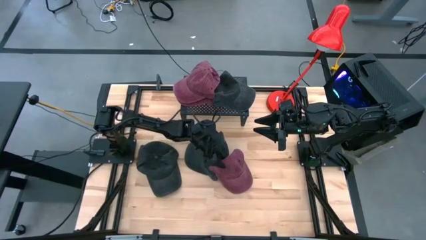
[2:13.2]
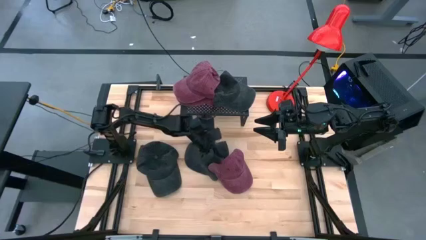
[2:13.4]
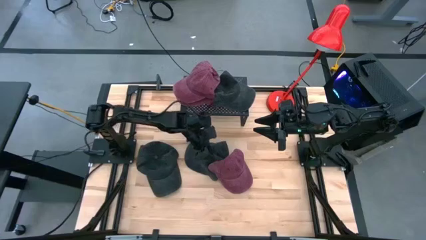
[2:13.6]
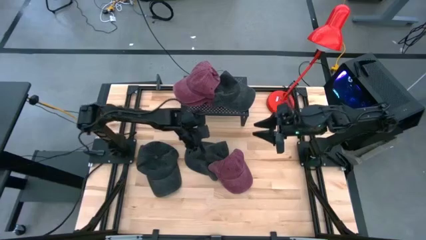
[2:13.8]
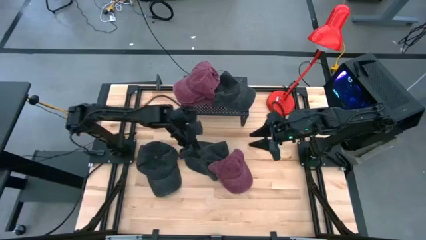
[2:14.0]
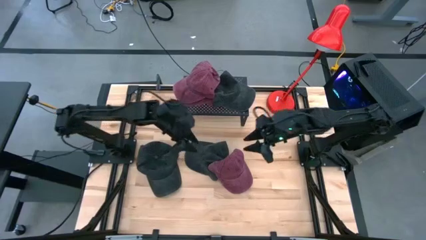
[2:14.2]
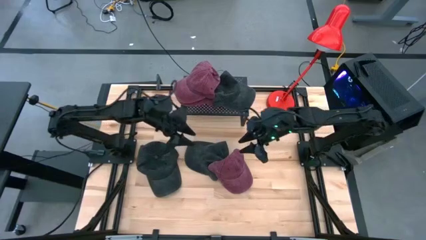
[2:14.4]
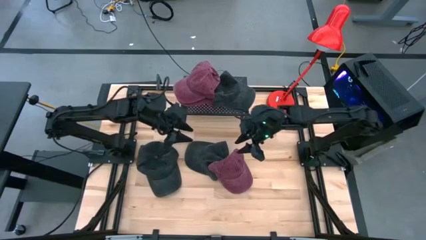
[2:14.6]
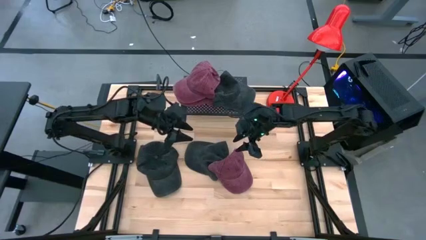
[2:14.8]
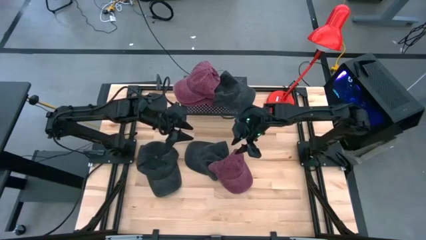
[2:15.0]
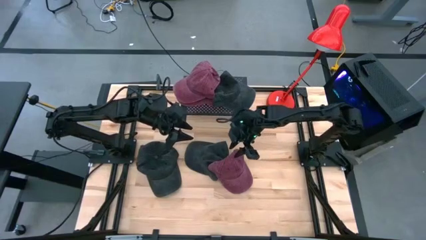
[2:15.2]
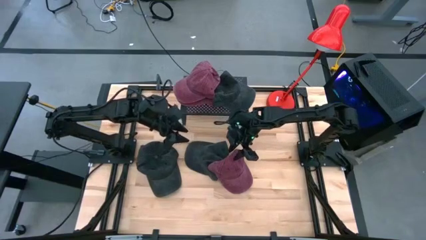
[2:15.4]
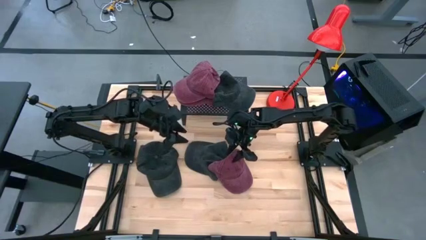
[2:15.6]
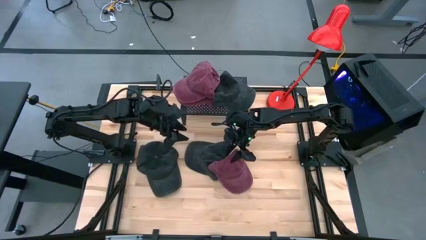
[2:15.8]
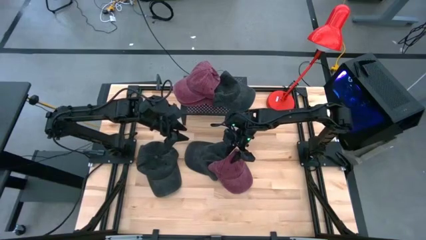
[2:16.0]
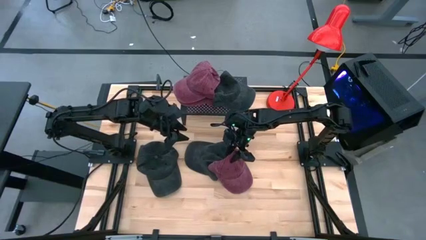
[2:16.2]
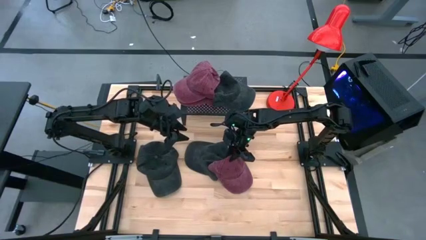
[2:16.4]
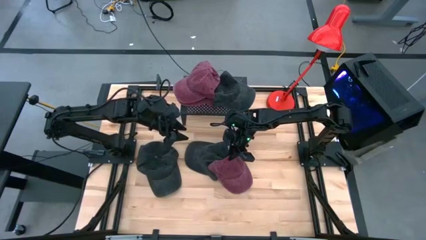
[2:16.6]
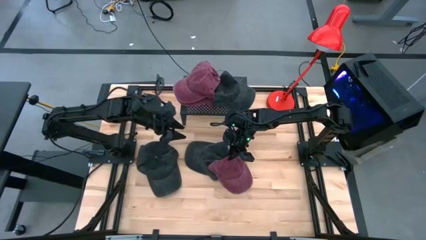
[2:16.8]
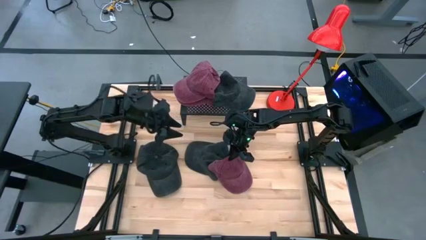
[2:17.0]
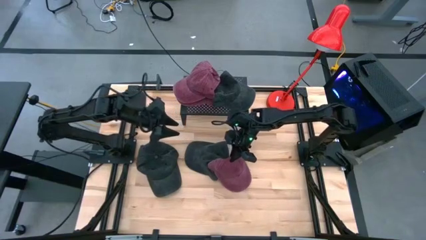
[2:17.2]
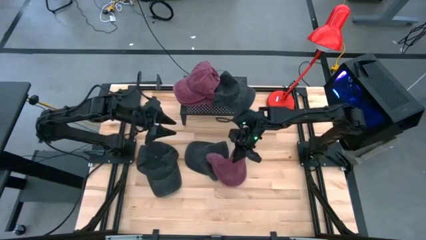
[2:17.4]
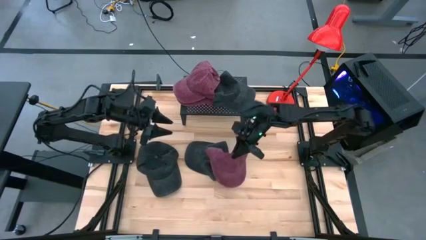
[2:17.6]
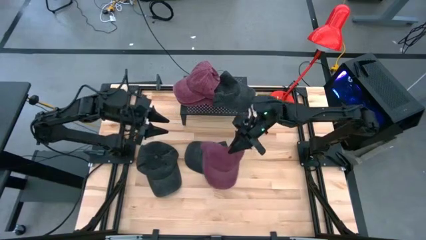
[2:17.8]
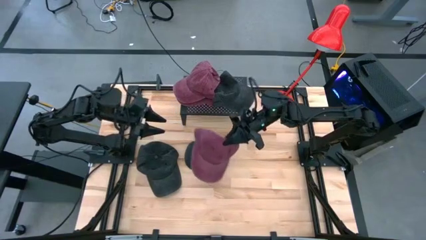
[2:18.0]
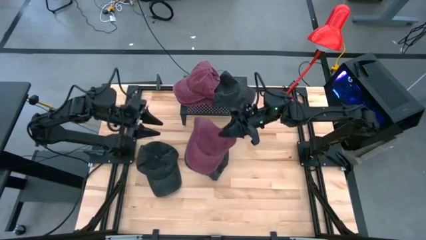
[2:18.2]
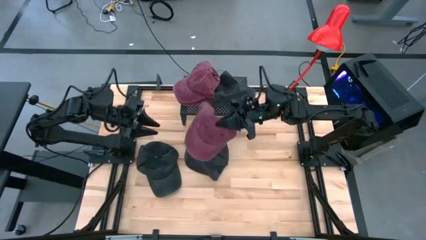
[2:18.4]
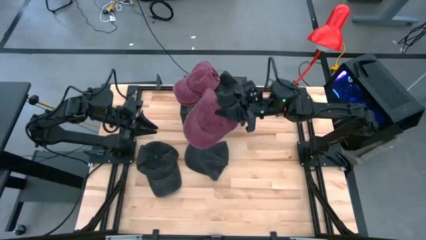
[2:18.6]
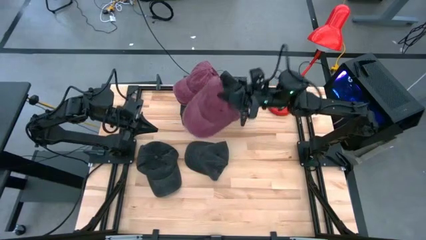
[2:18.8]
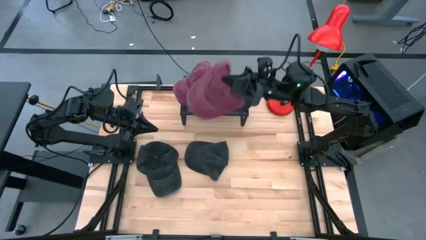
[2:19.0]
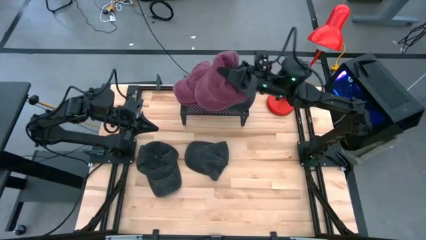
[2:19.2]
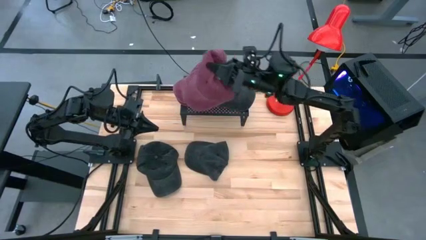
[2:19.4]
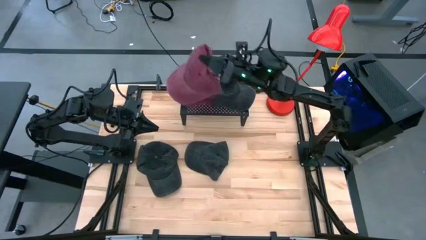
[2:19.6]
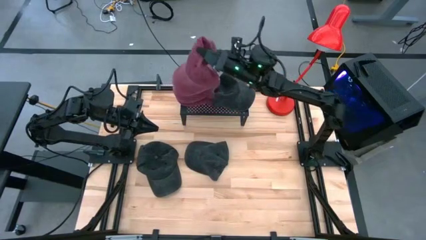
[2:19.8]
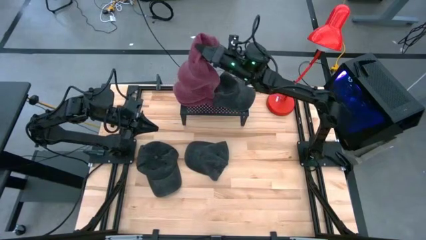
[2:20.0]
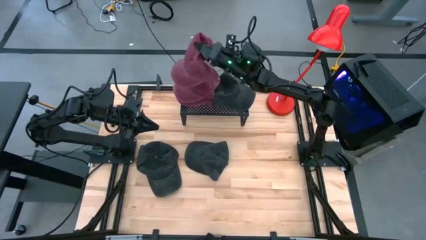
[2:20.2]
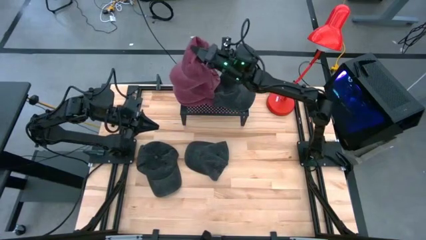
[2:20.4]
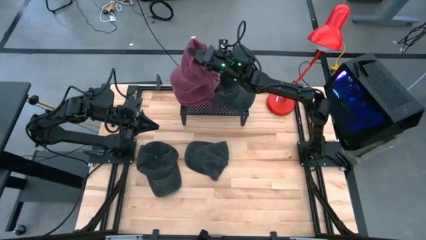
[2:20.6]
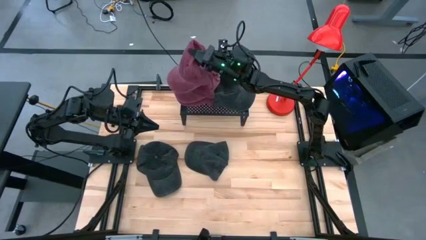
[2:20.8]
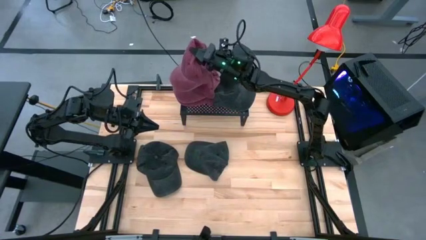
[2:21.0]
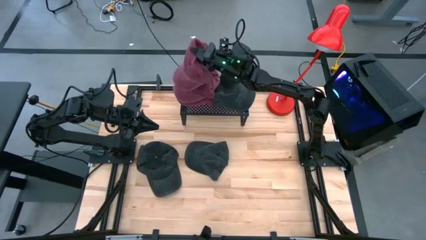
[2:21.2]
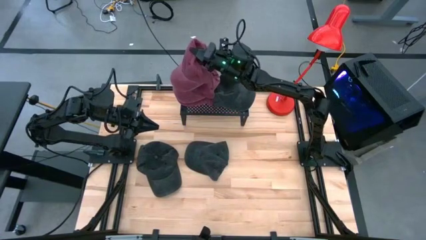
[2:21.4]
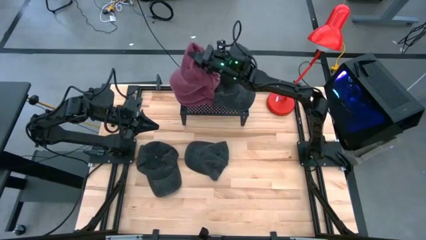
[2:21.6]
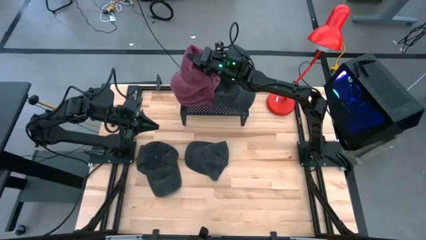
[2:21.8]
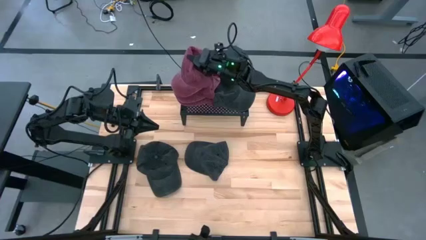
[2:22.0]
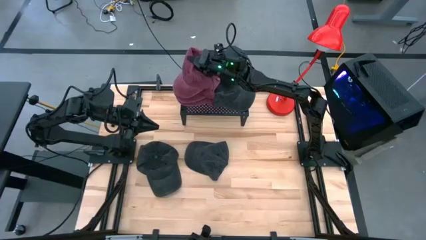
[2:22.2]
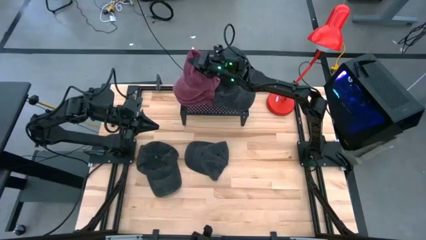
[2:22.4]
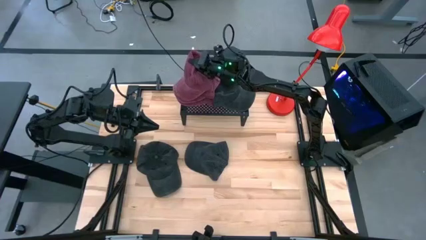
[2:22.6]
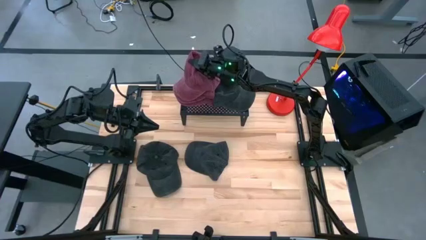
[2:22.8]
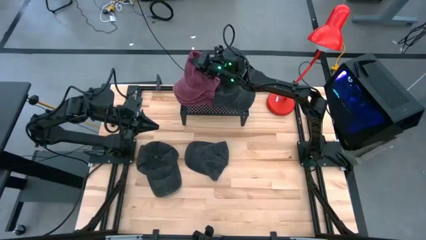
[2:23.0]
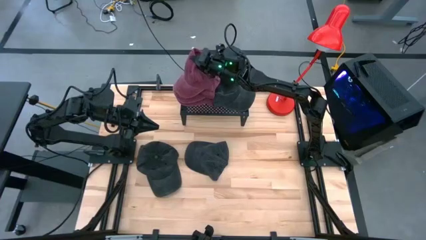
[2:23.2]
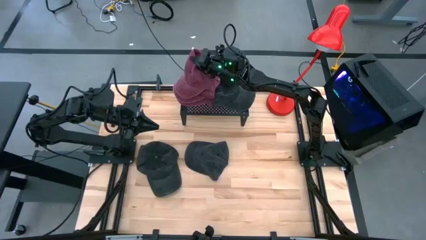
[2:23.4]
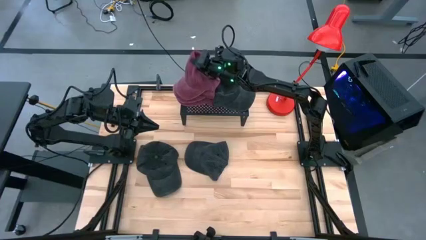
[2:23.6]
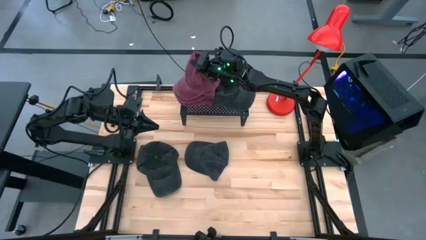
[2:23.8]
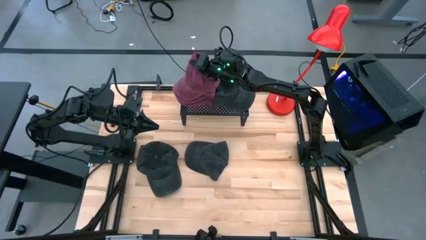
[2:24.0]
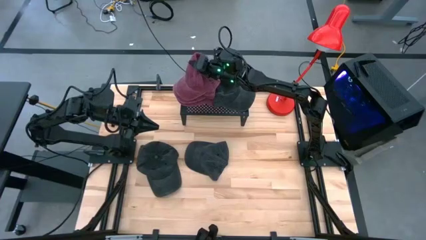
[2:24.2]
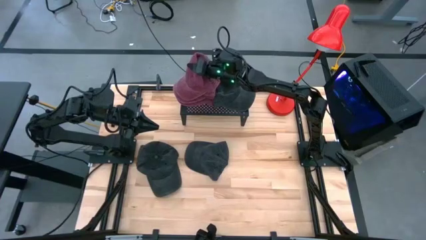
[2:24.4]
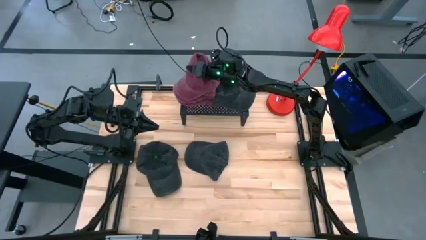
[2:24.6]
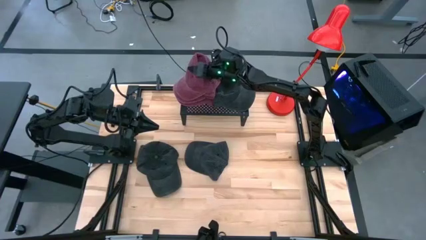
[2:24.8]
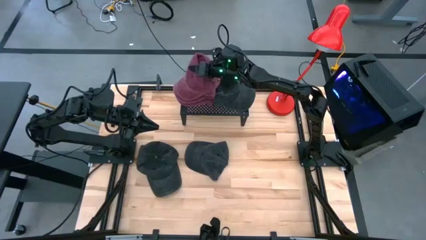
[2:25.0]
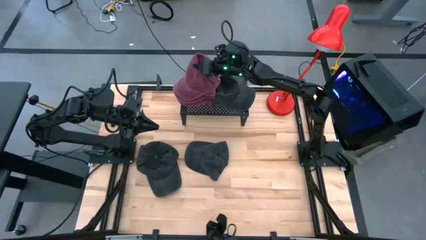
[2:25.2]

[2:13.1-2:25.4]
Task: Pick & Place hat
Put the red cap on top of the stacked red caps on the shelf

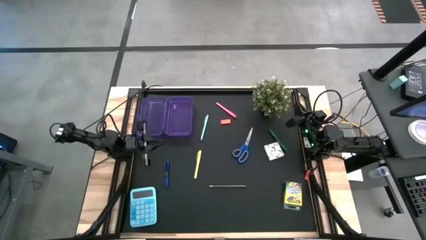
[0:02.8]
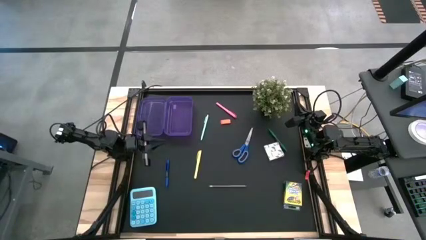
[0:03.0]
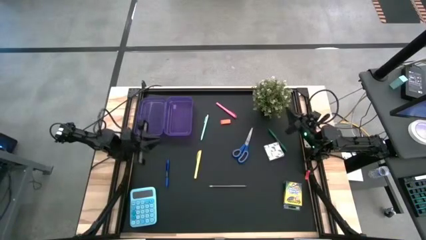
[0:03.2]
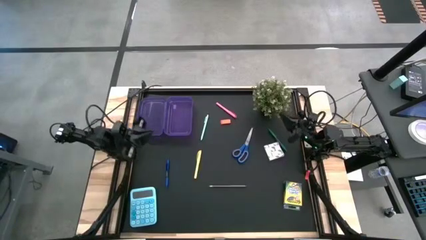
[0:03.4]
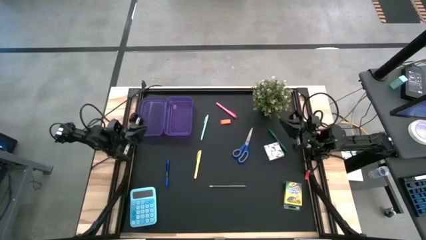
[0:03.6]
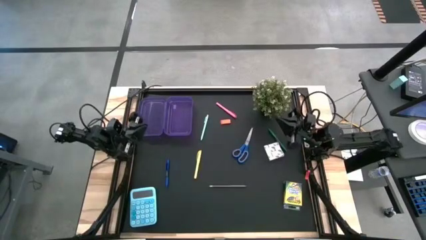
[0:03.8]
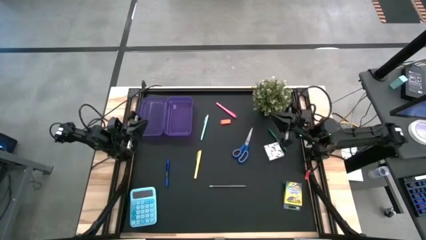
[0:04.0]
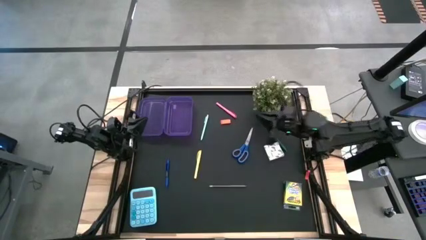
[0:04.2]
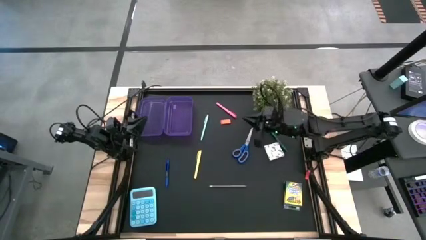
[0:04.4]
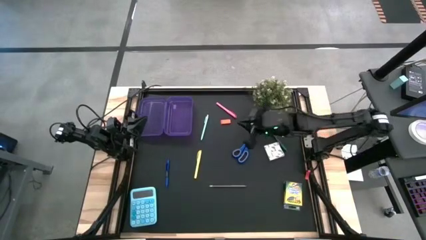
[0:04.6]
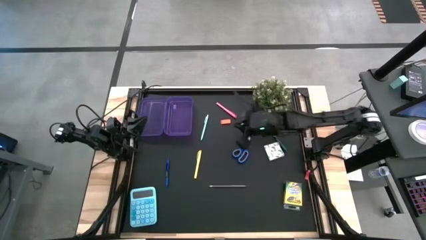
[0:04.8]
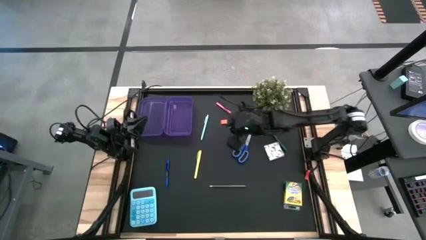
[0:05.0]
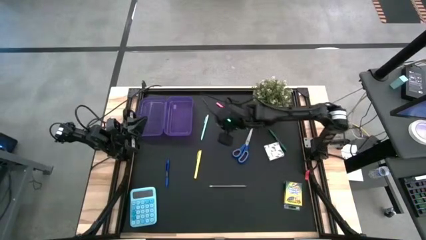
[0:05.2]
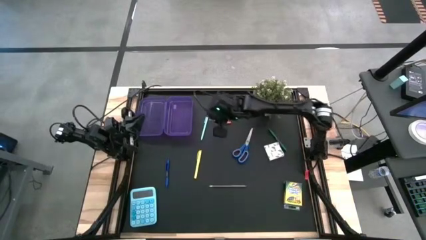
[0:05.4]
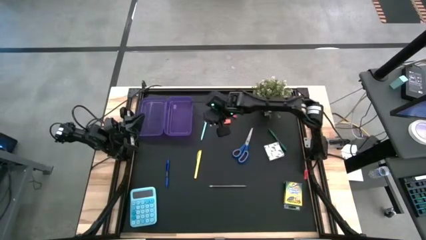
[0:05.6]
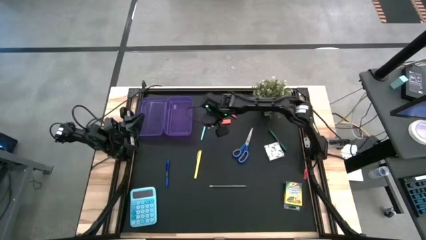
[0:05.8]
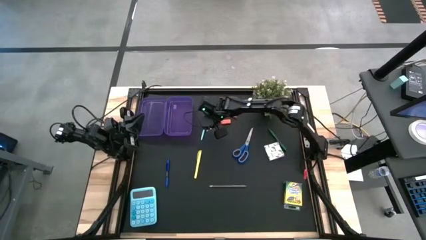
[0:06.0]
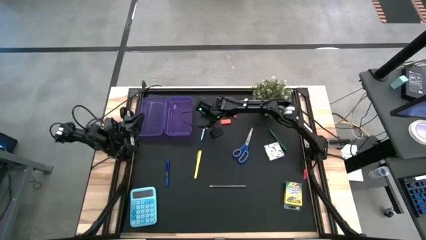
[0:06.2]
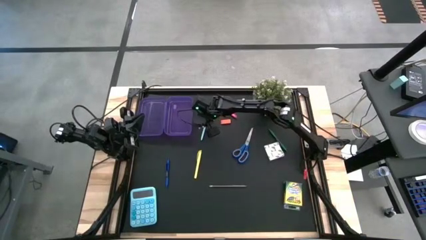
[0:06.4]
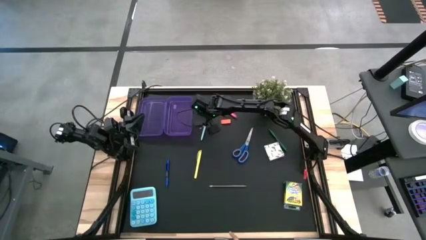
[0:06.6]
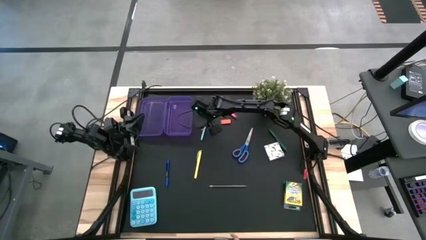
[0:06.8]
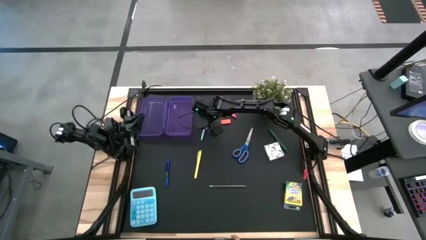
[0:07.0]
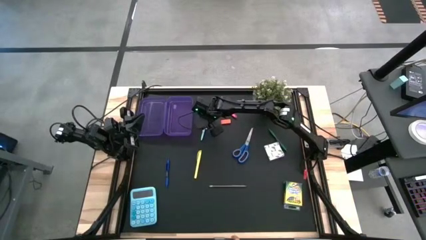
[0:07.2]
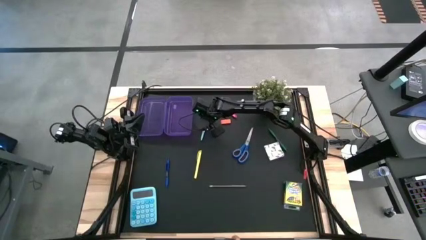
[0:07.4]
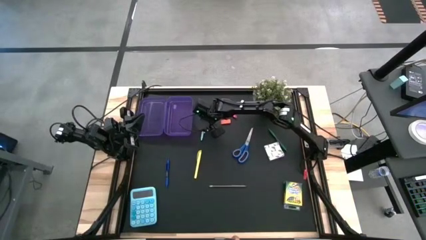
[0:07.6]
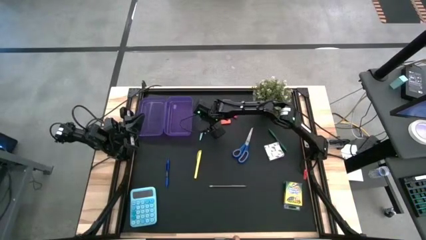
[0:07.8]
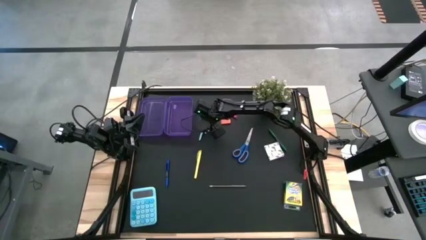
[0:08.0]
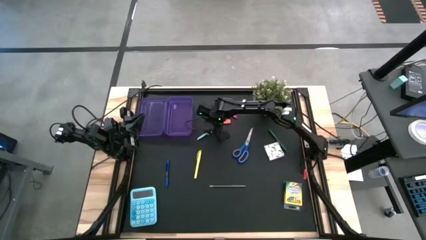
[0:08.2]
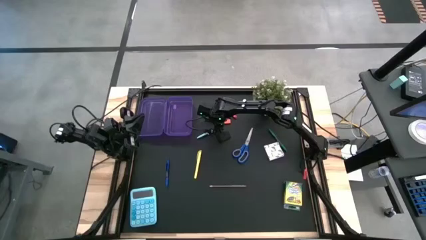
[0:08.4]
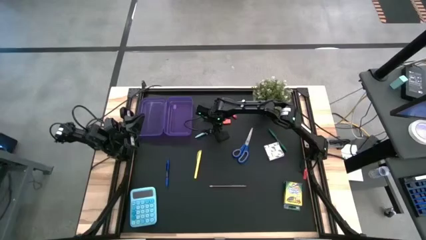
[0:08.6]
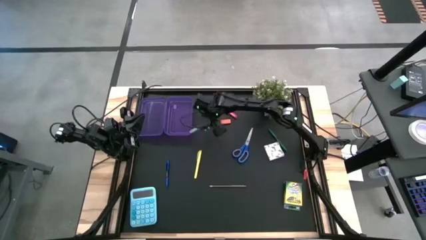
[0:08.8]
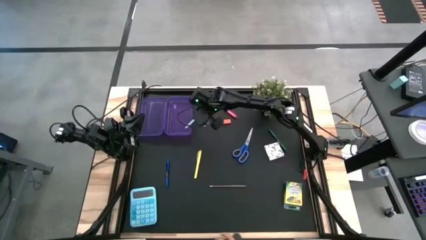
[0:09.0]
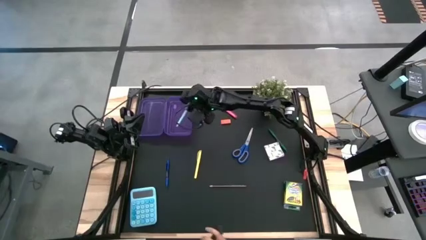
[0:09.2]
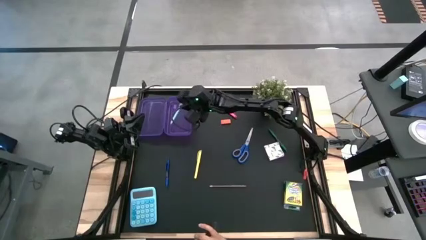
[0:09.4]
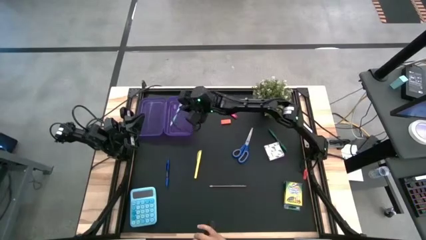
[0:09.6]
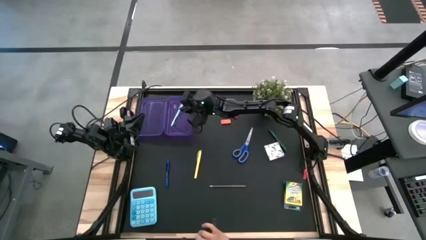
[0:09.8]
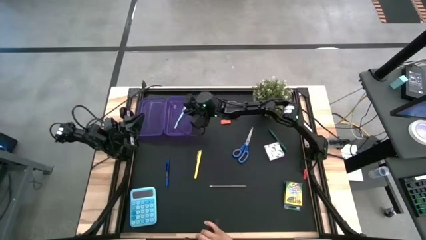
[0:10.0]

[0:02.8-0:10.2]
Task: Pack school essentials
Put the light blue pen into the purple box
